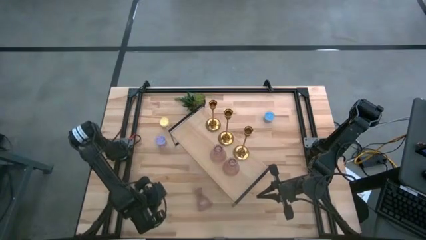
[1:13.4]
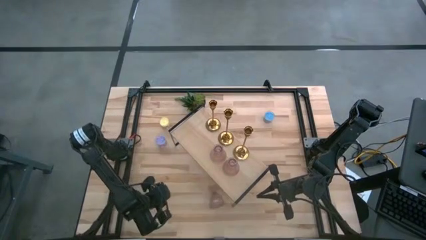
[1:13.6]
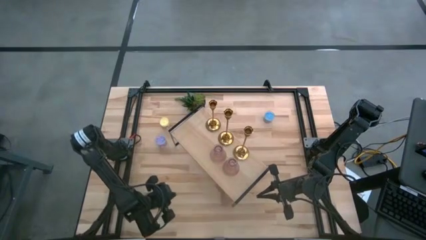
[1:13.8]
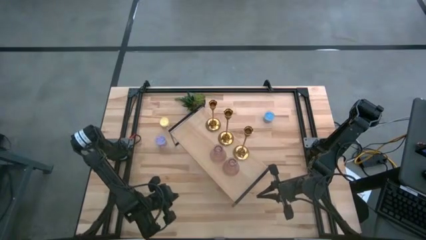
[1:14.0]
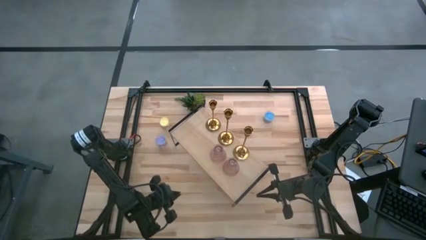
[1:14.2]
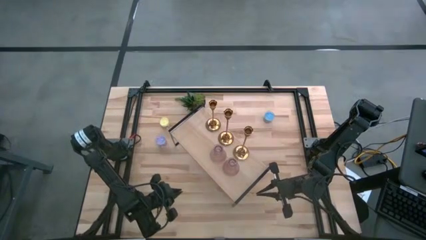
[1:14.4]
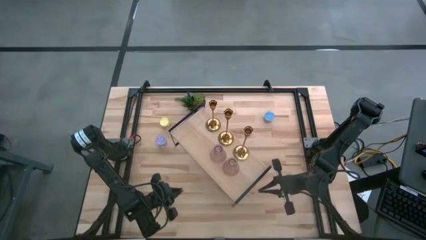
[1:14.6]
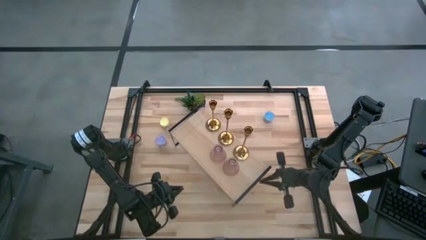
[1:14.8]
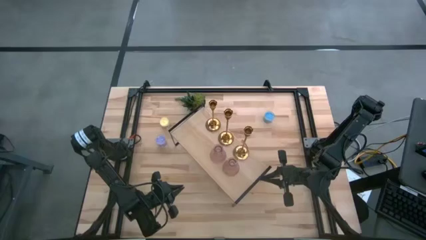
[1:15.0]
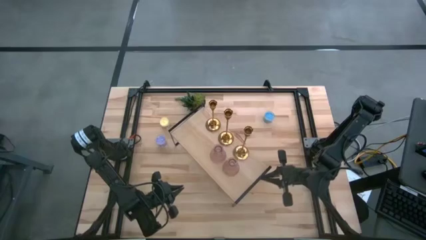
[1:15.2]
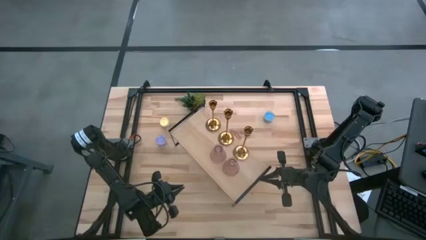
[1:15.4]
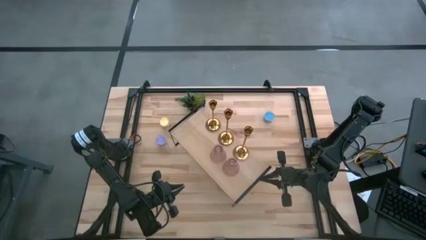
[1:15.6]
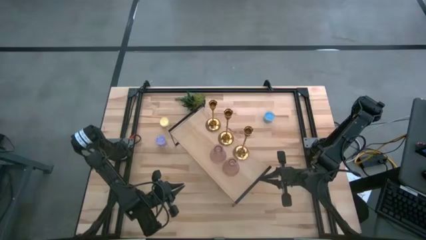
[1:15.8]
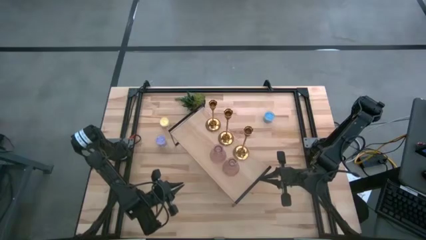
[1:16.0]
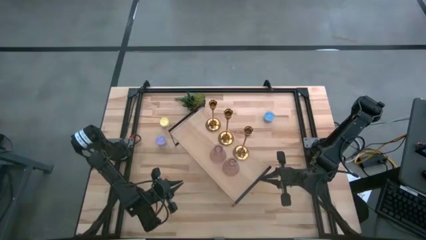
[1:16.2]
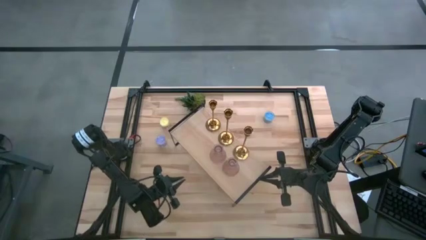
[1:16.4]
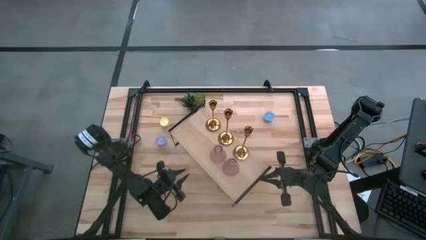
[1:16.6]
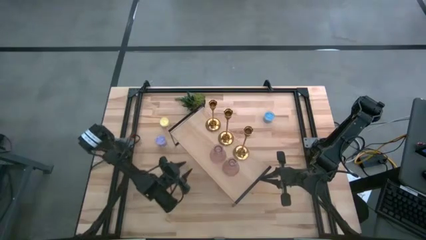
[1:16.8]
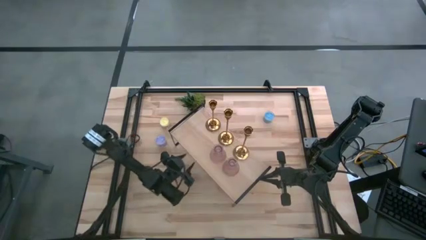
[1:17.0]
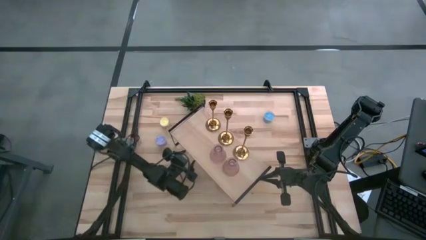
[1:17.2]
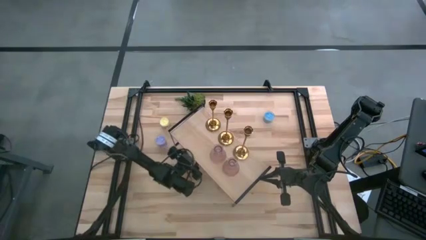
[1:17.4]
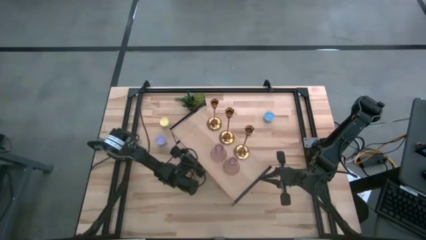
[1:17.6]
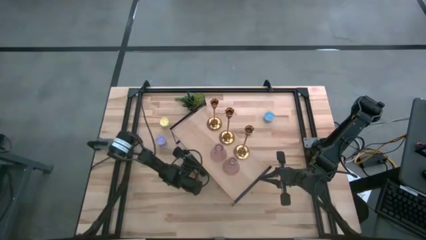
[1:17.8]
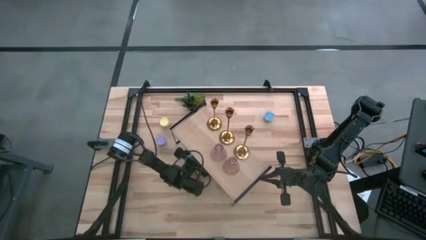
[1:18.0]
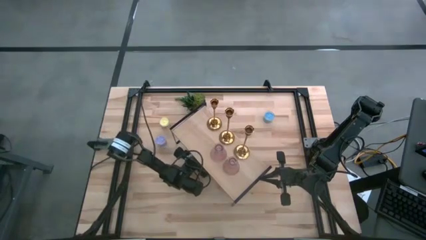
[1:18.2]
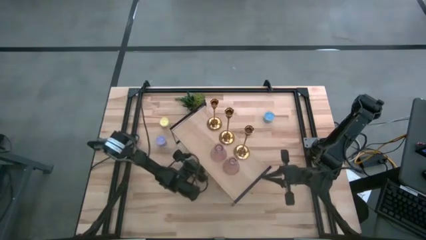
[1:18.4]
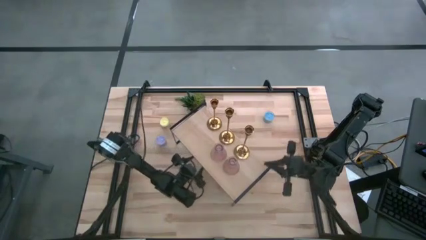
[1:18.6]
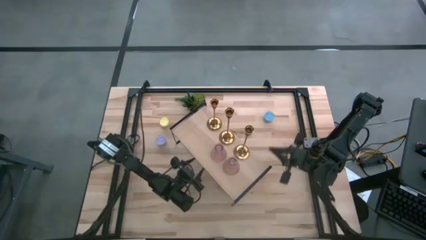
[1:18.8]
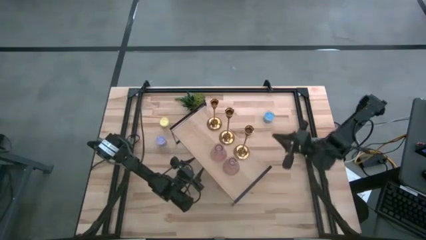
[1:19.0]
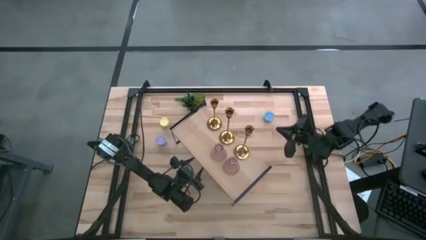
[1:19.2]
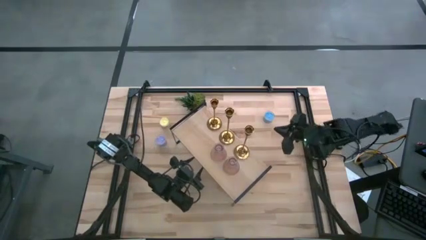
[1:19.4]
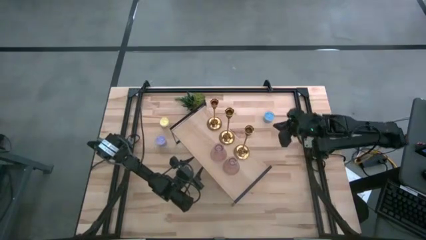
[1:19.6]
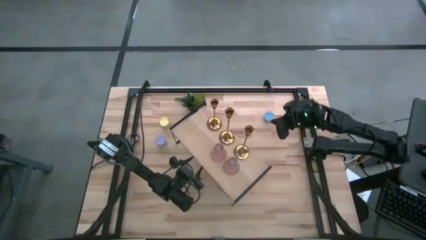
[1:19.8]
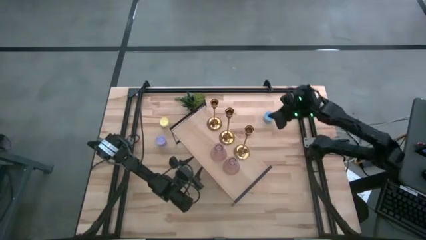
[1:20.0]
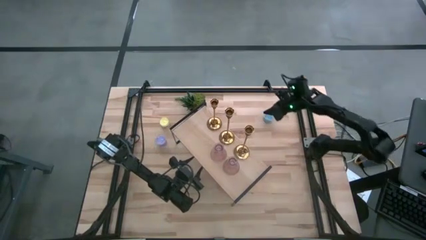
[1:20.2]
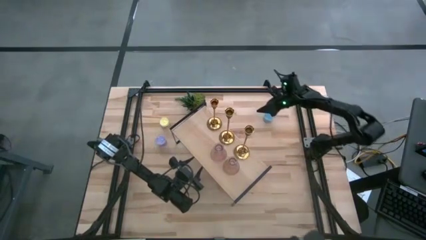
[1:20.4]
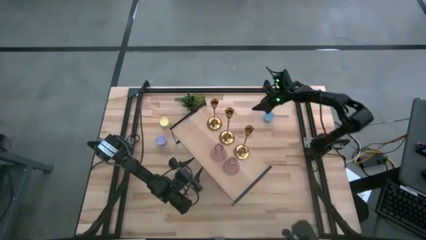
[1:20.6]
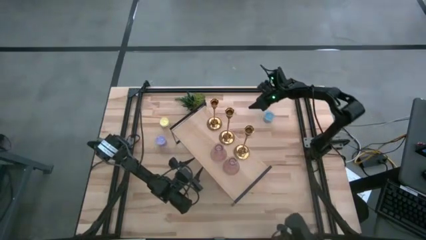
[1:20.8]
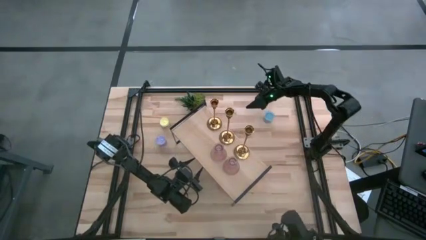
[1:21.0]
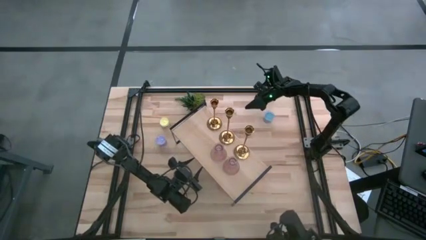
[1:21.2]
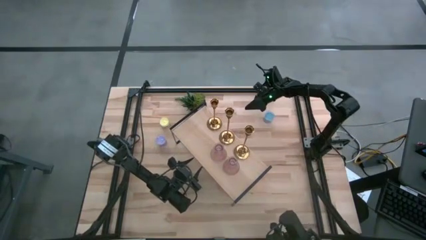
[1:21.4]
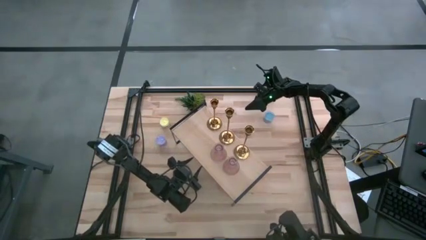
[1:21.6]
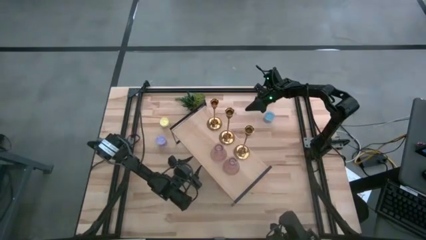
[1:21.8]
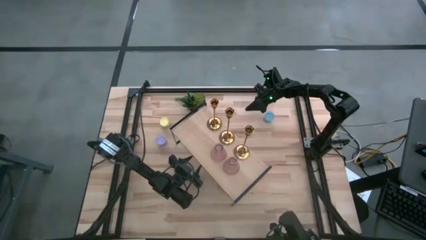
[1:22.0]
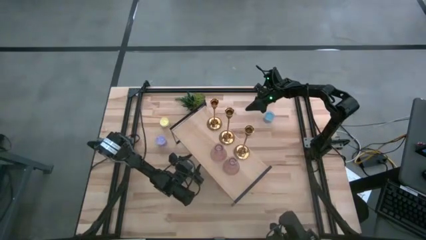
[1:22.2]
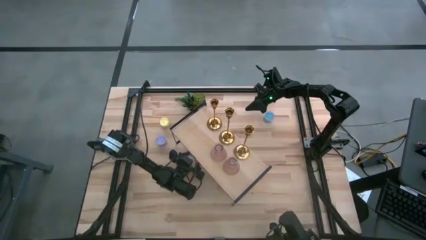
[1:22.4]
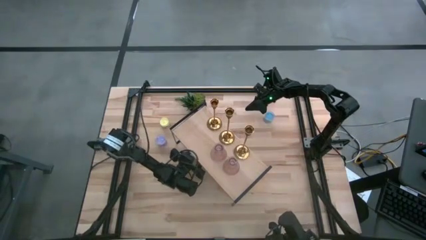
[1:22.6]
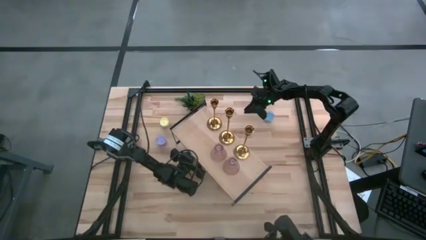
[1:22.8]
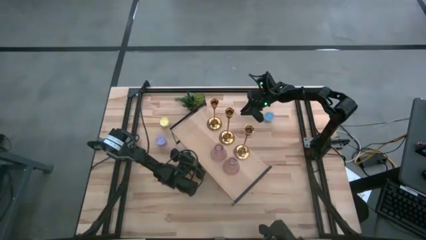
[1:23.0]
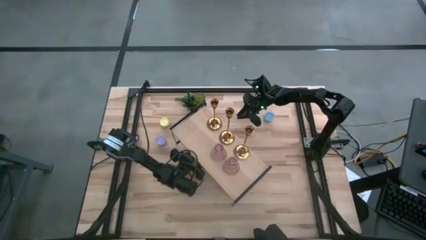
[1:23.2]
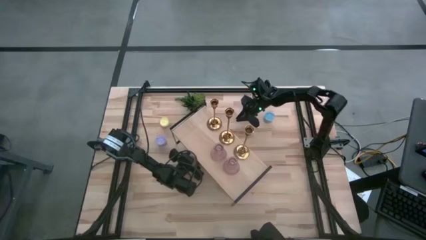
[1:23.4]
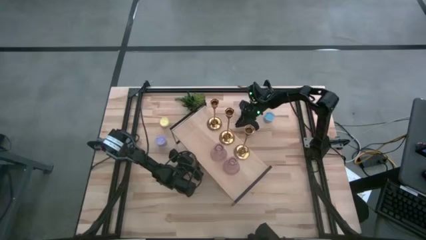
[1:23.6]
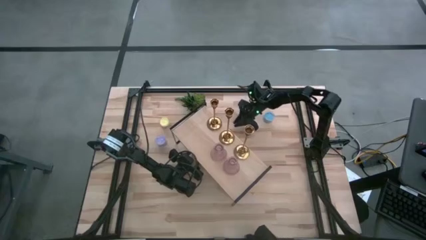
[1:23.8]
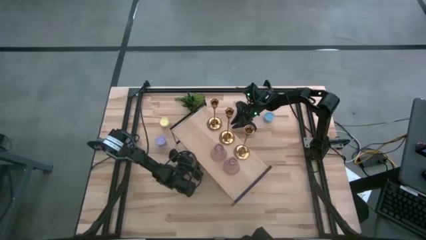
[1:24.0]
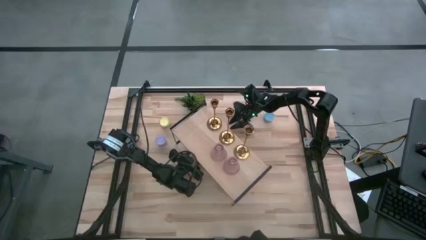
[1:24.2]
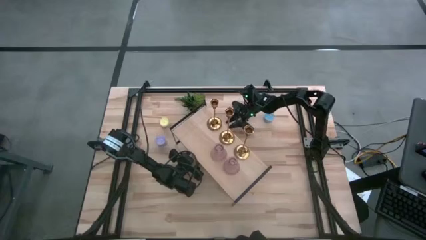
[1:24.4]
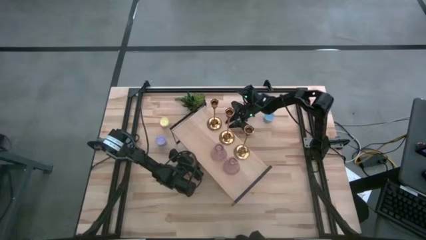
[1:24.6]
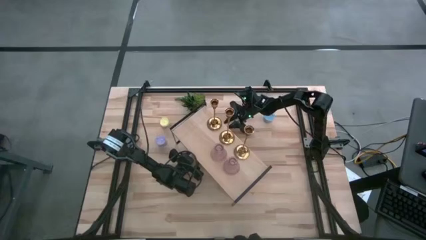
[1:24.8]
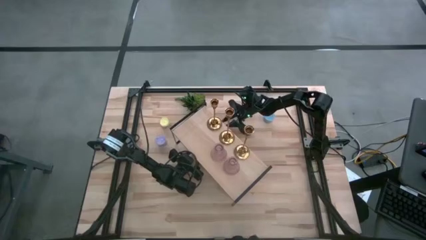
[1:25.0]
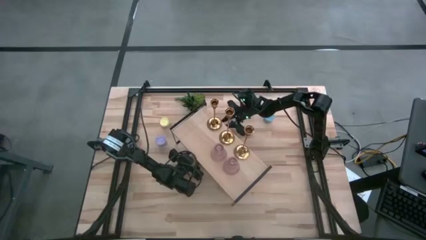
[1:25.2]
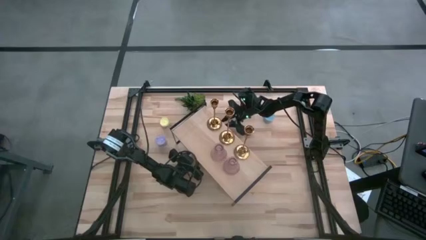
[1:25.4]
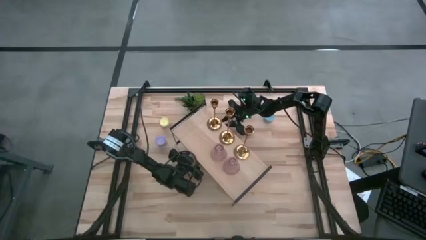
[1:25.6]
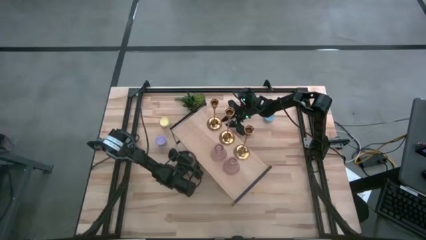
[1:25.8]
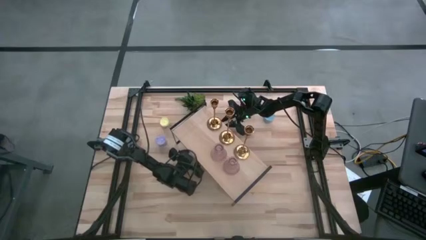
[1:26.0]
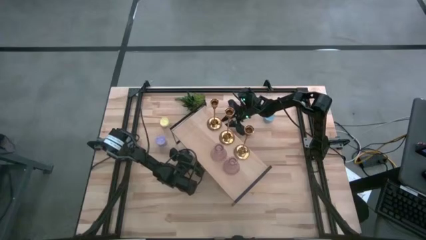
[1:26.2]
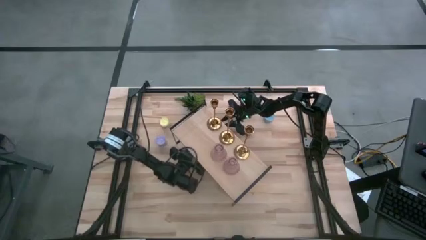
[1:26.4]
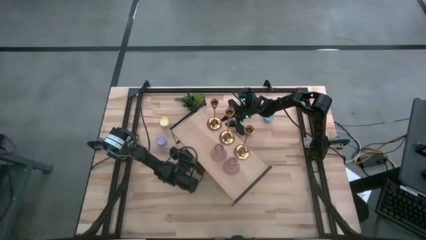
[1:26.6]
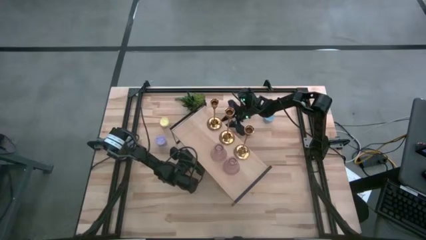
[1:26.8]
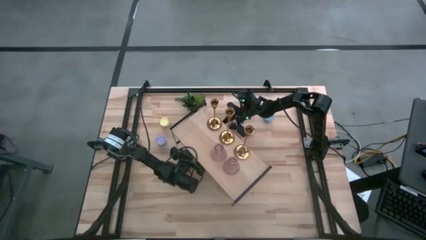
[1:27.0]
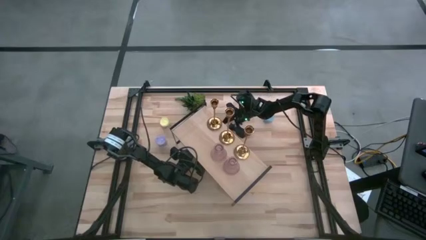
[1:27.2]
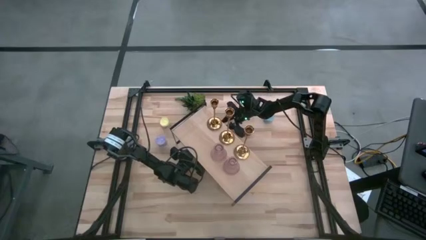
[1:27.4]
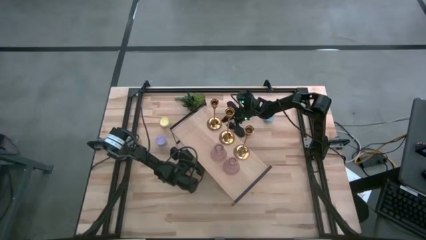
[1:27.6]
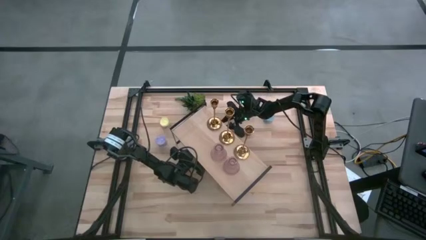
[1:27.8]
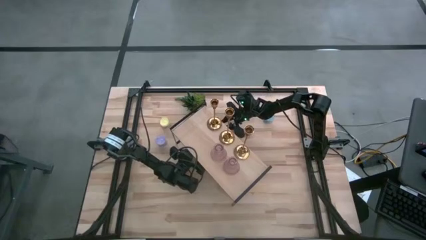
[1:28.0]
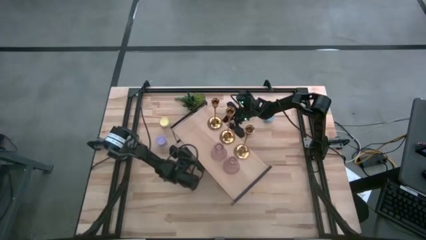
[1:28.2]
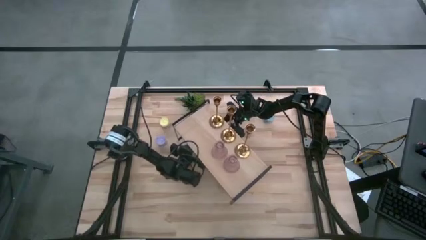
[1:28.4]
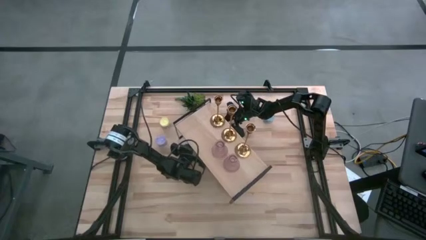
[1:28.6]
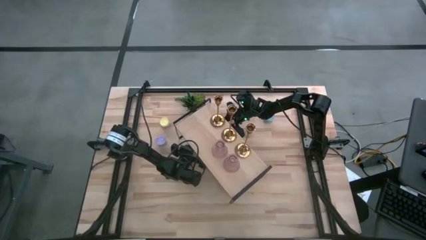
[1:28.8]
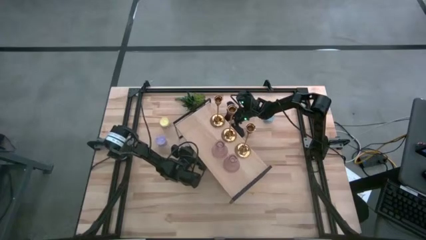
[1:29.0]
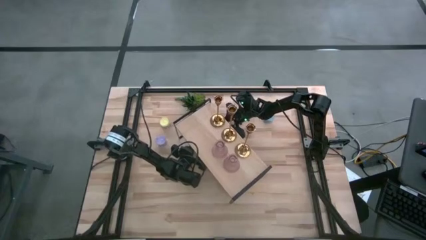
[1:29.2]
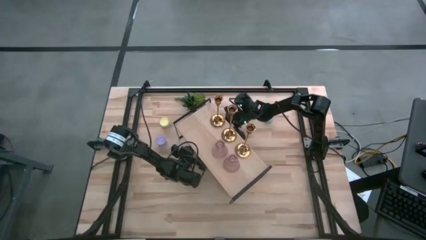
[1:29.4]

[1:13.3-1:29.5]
Task: Pick & Place candle stick holders
Put the pink glass candle holder on the shelf aligned with the other pink glass candle holders
